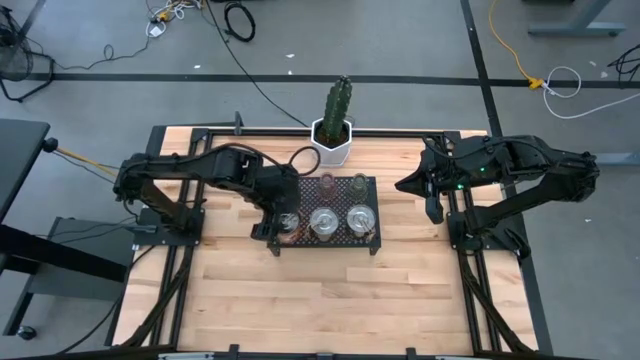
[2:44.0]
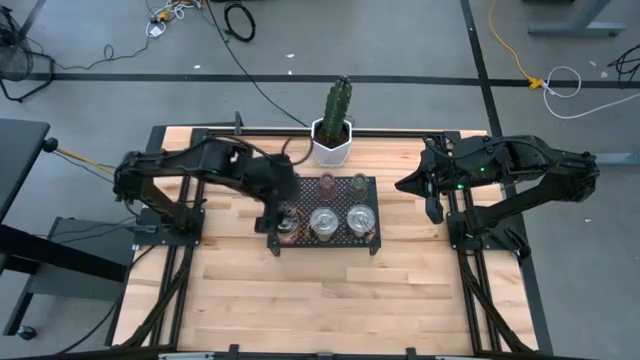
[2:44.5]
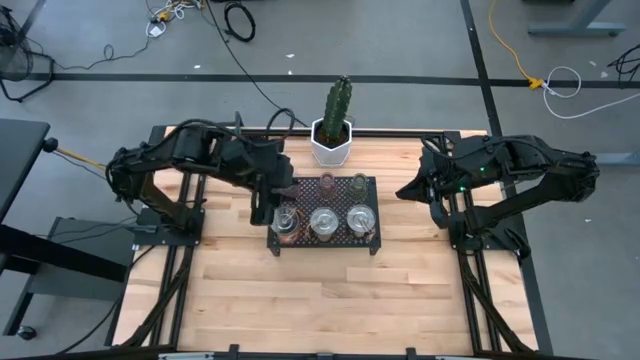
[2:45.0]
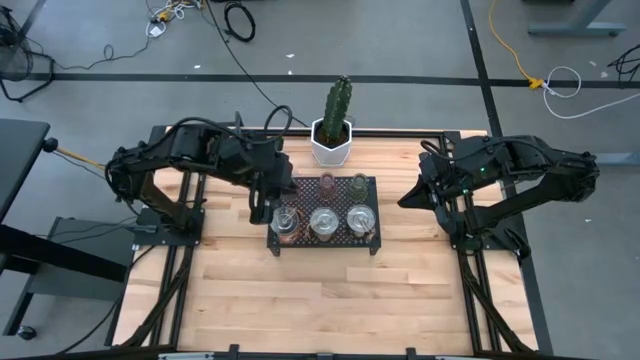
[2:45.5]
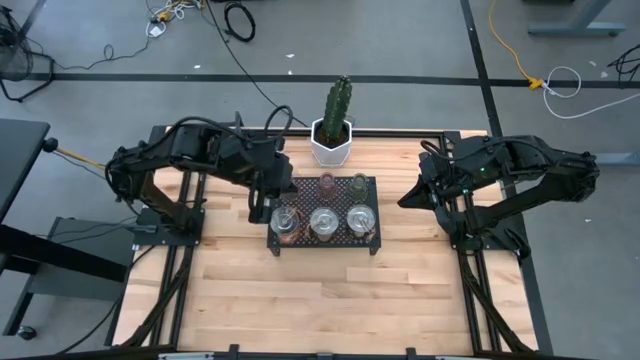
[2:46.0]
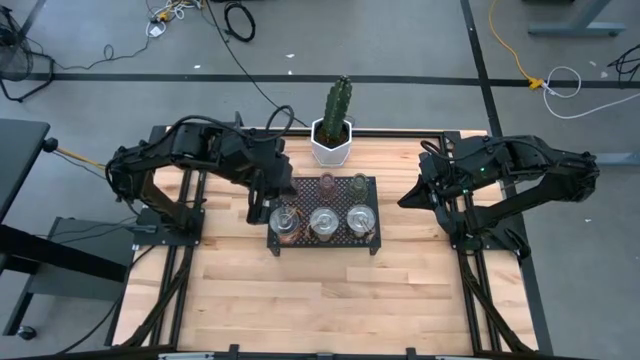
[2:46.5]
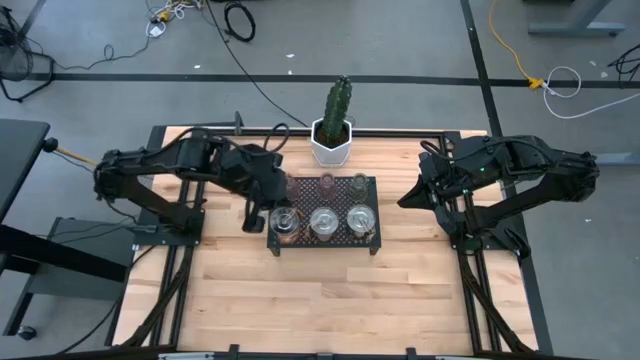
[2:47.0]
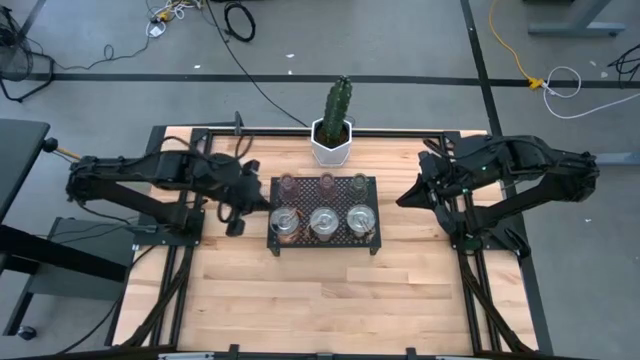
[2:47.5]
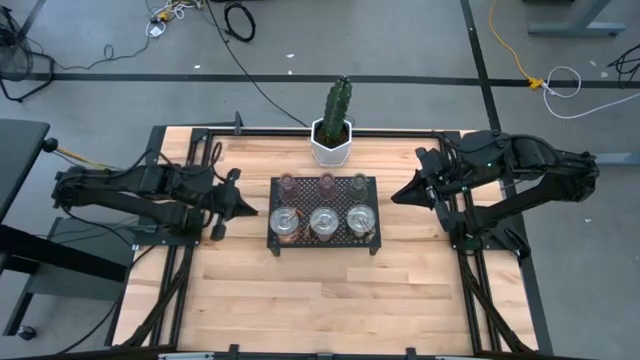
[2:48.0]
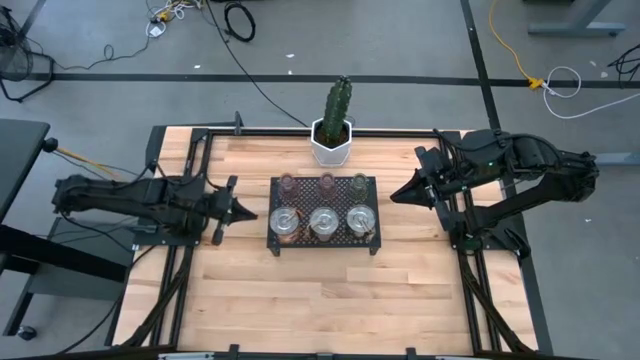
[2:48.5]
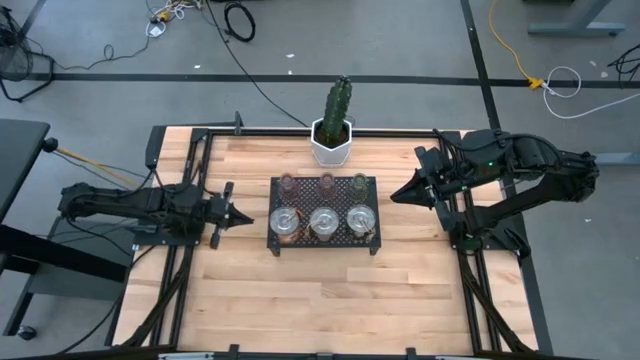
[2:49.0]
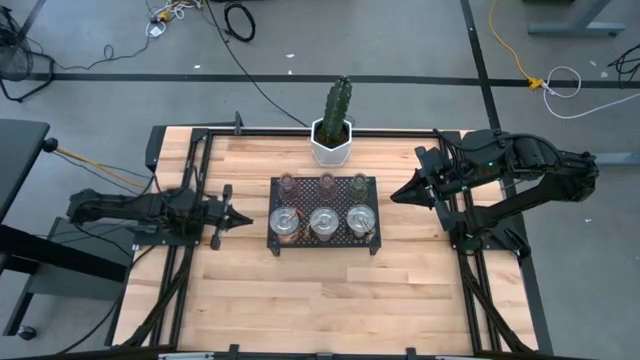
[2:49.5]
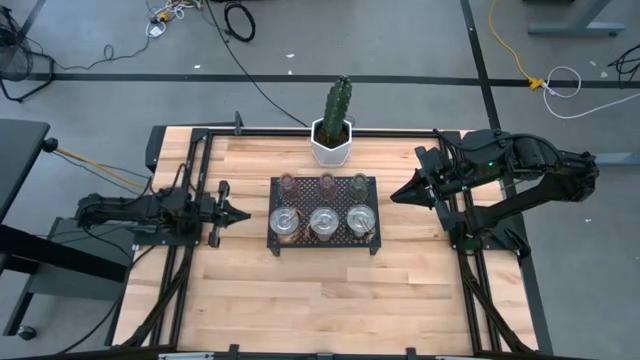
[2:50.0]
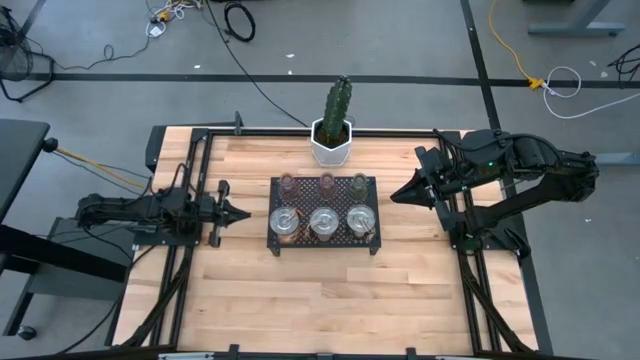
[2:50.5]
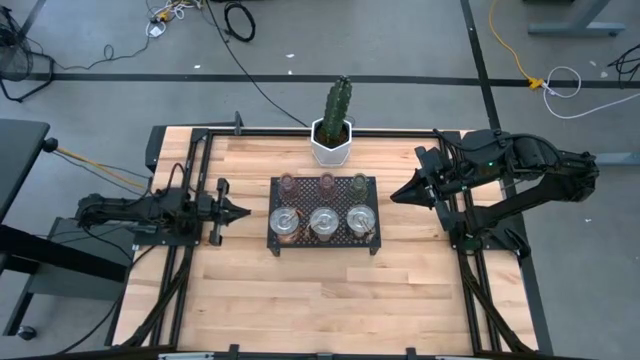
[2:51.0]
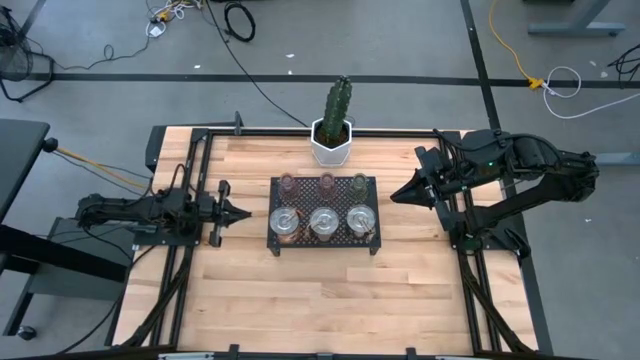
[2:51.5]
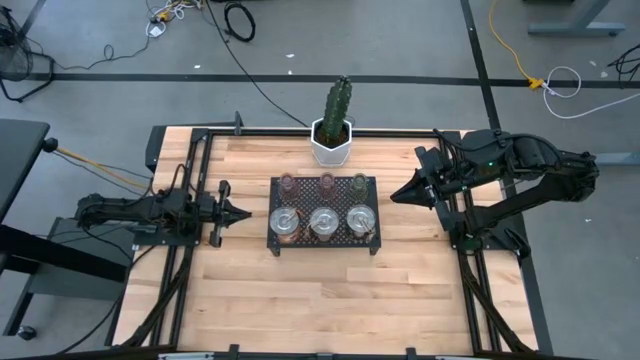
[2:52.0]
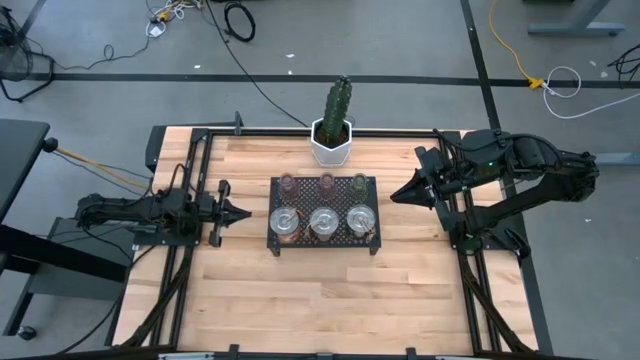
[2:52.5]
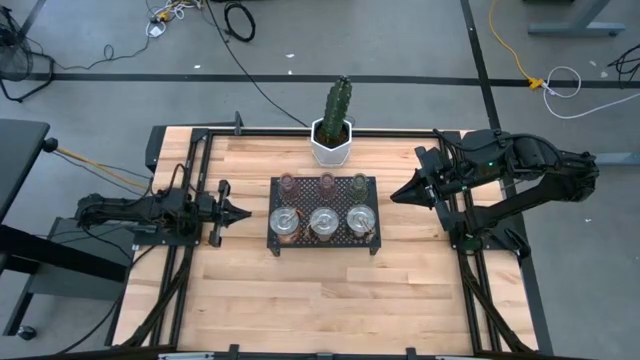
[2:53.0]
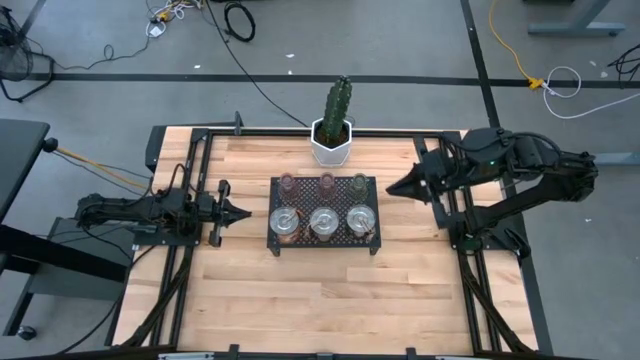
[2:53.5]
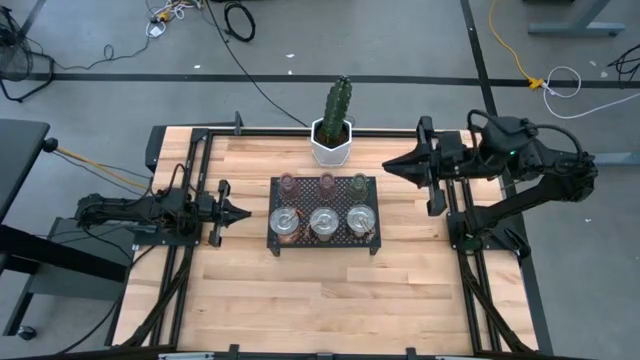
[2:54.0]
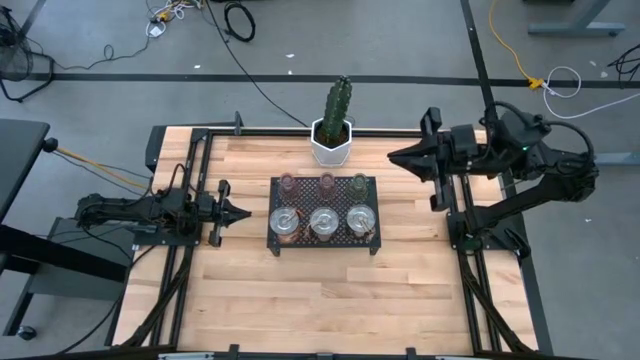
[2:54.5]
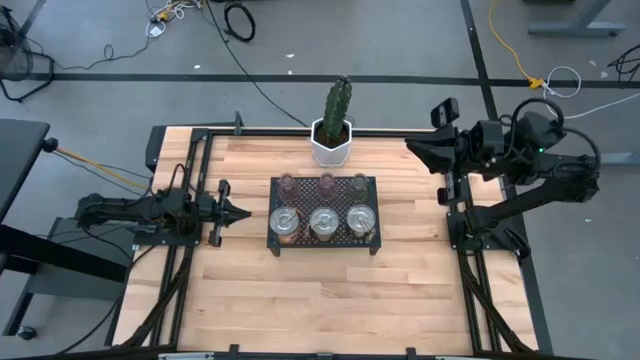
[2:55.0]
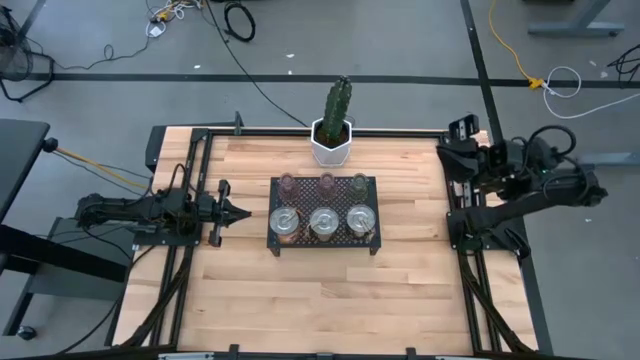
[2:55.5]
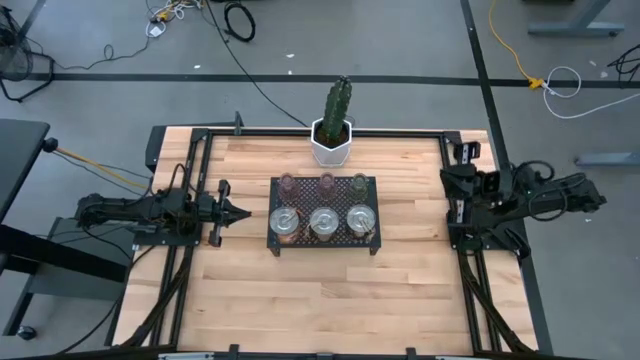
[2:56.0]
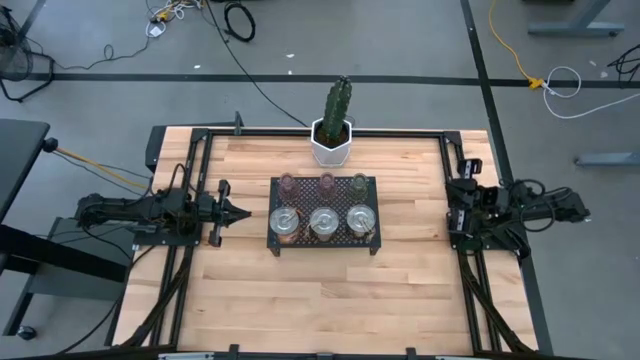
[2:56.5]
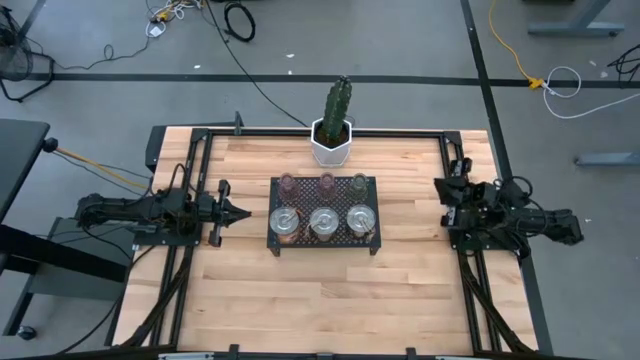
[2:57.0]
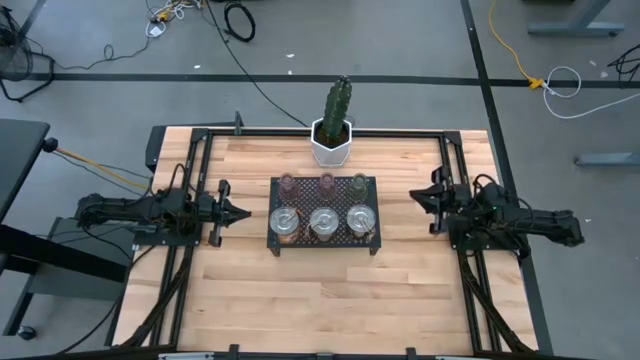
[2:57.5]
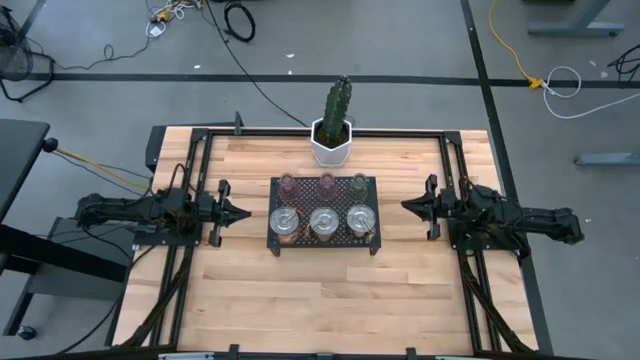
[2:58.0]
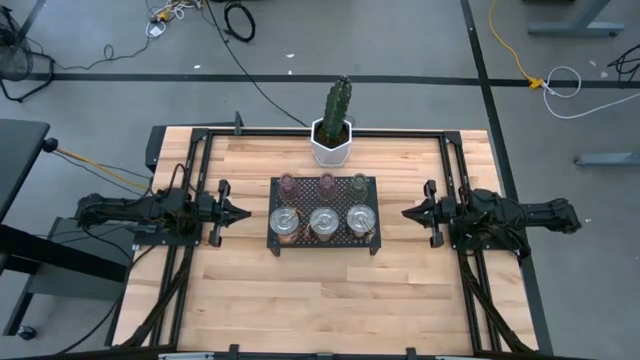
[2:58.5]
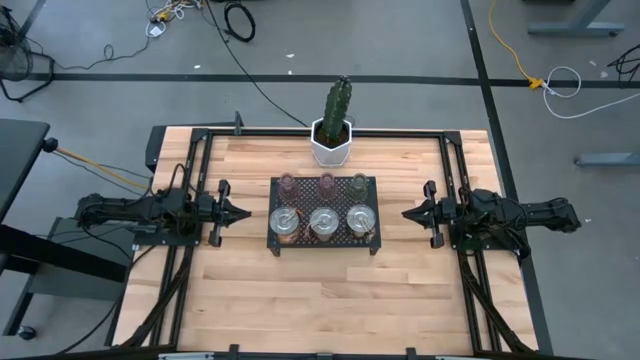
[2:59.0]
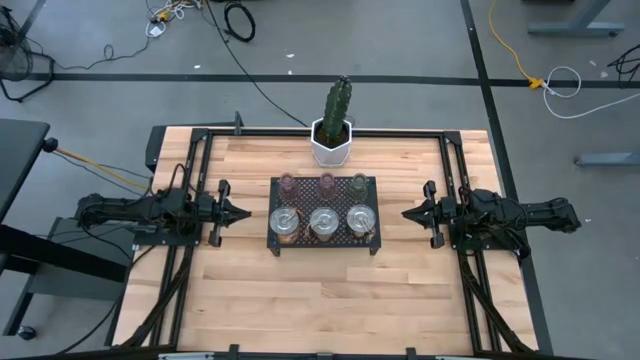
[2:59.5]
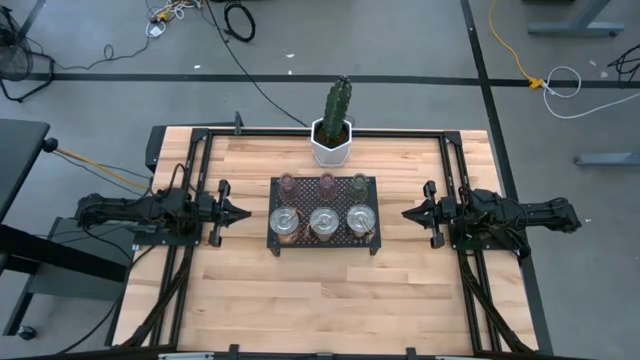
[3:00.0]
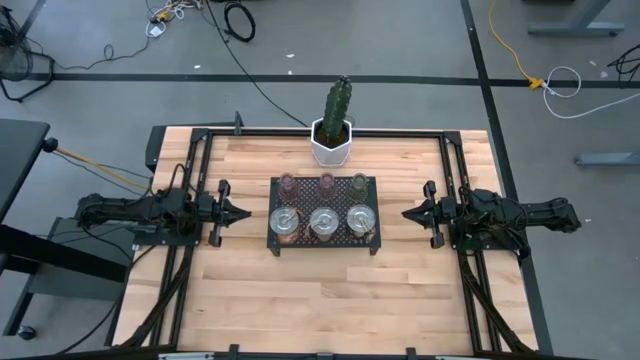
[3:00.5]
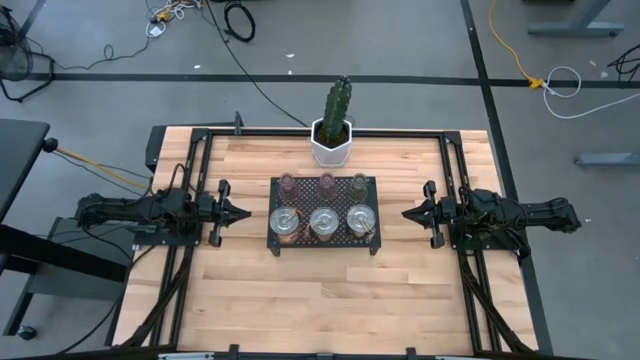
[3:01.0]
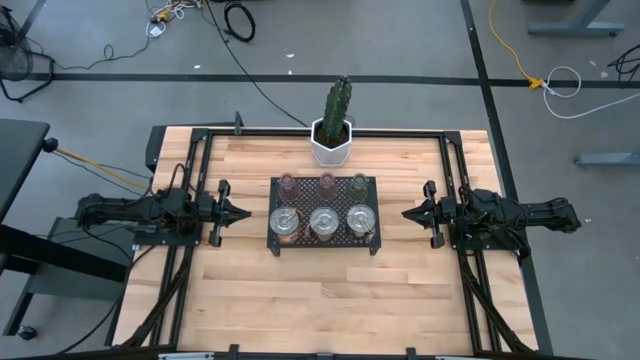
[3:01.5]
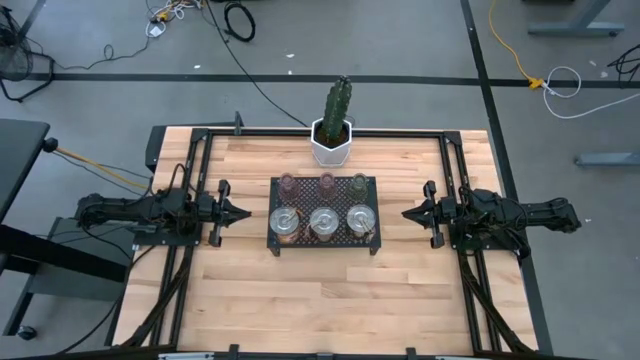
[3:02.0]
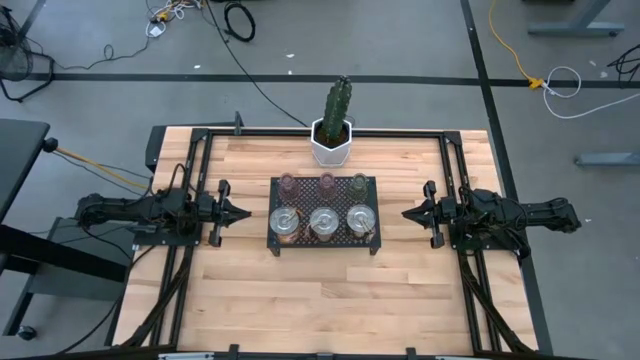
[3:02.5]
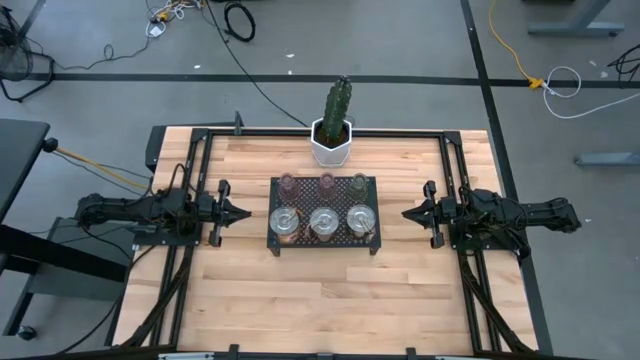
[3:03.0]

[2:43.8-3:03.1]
Task: Pick & Place candle stick holders
Return to Home Position
